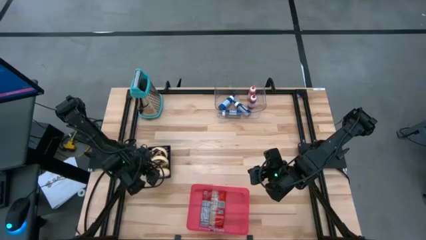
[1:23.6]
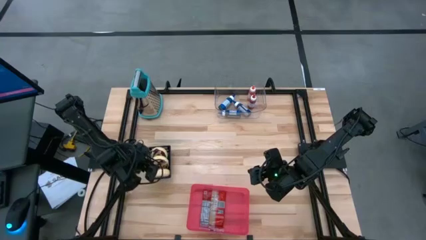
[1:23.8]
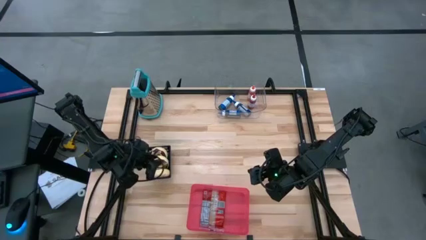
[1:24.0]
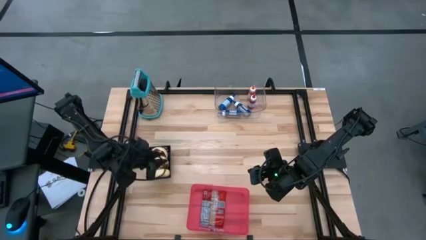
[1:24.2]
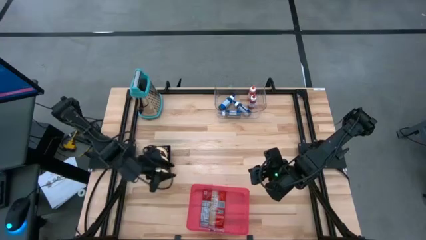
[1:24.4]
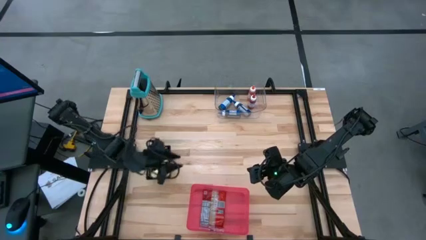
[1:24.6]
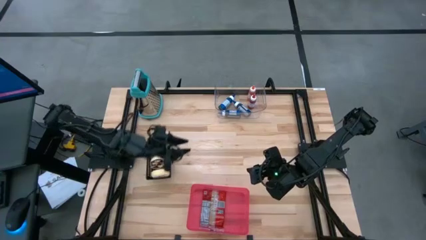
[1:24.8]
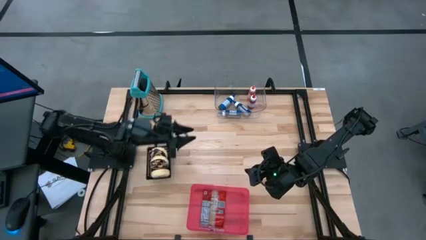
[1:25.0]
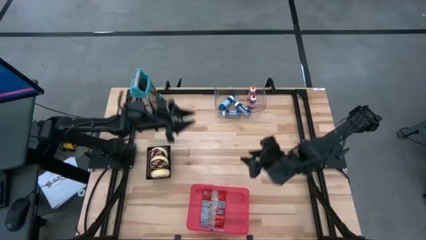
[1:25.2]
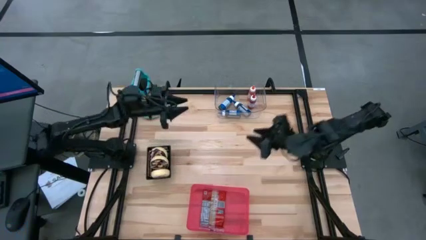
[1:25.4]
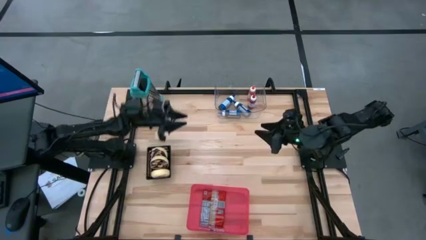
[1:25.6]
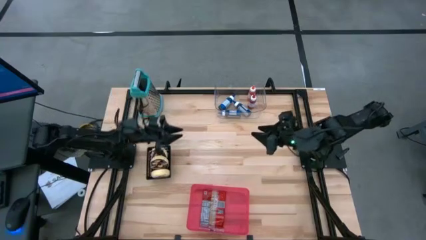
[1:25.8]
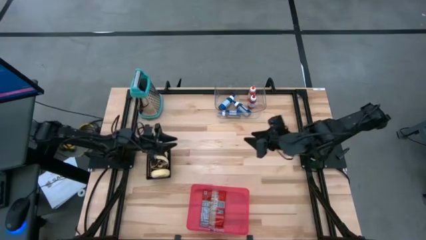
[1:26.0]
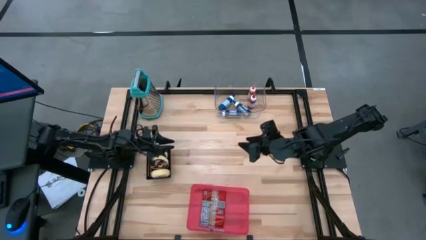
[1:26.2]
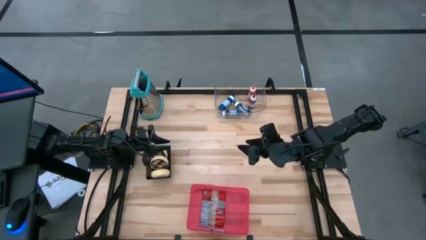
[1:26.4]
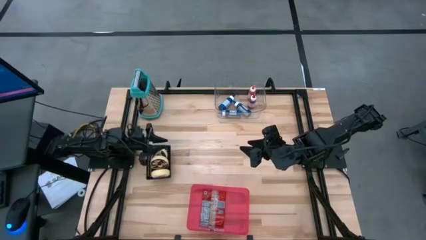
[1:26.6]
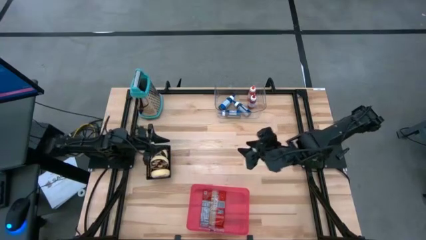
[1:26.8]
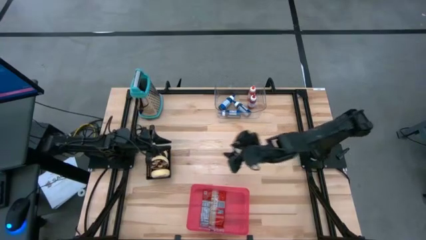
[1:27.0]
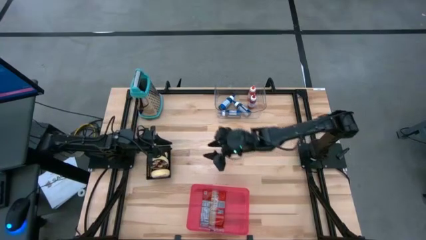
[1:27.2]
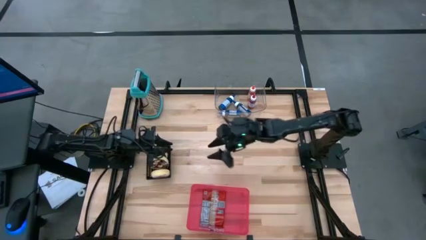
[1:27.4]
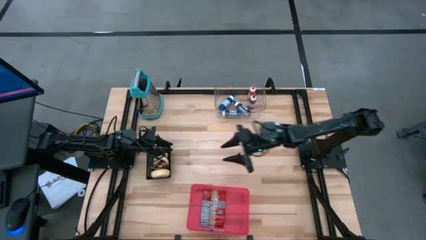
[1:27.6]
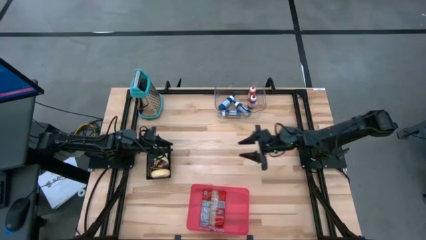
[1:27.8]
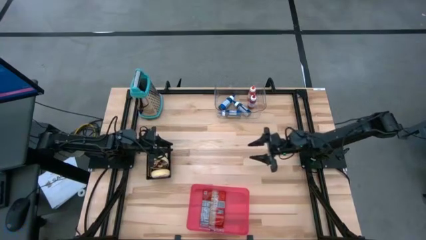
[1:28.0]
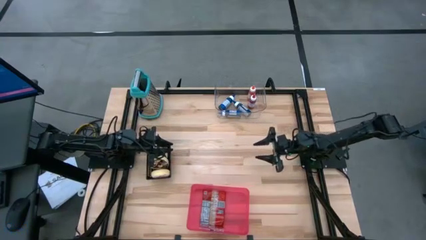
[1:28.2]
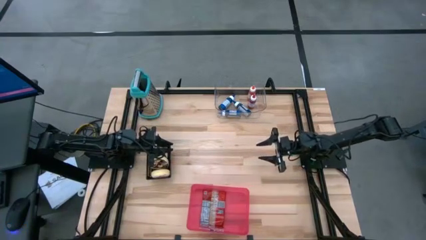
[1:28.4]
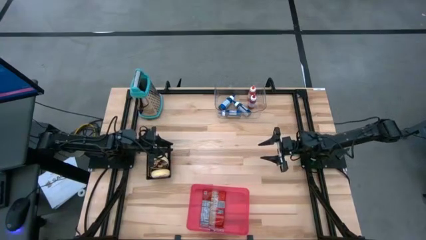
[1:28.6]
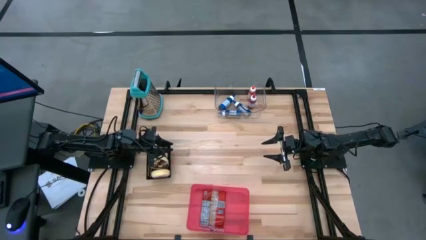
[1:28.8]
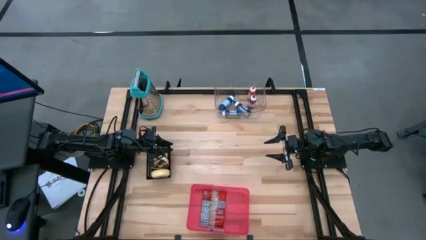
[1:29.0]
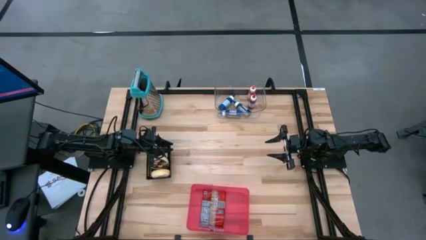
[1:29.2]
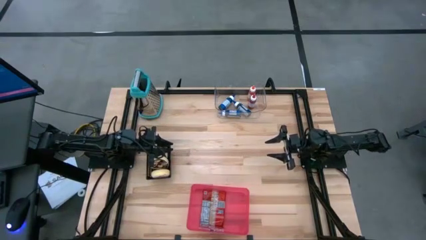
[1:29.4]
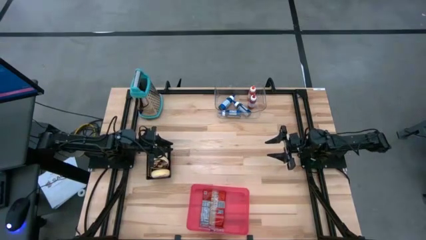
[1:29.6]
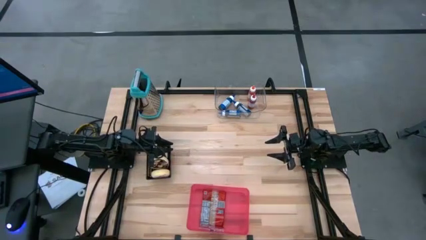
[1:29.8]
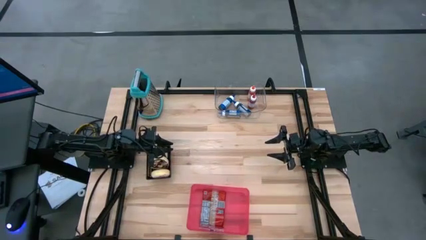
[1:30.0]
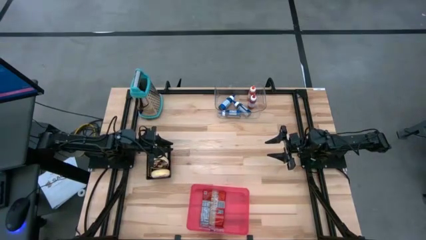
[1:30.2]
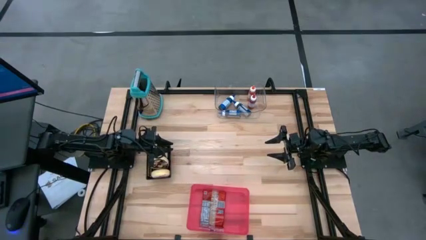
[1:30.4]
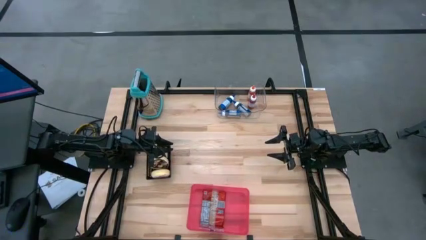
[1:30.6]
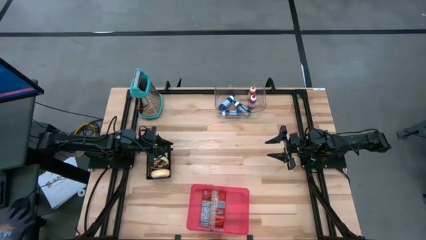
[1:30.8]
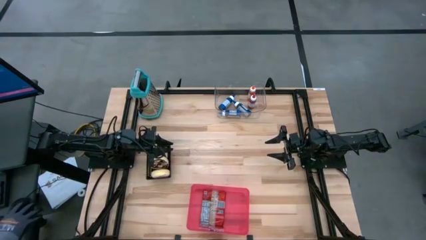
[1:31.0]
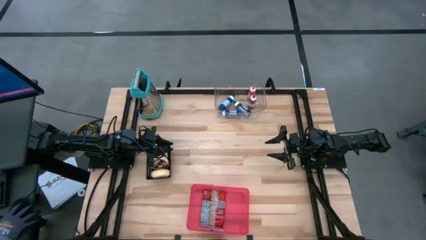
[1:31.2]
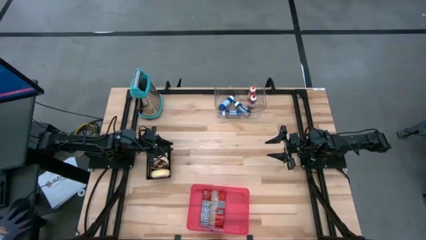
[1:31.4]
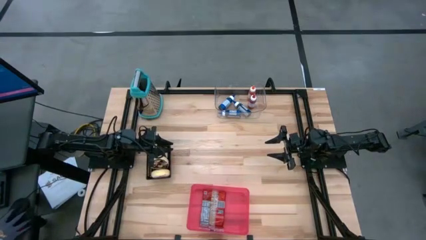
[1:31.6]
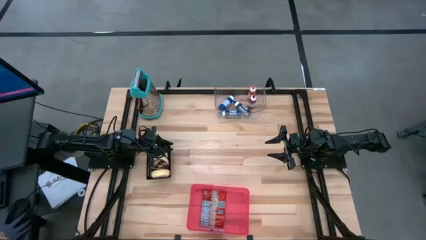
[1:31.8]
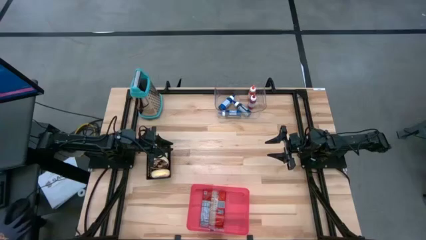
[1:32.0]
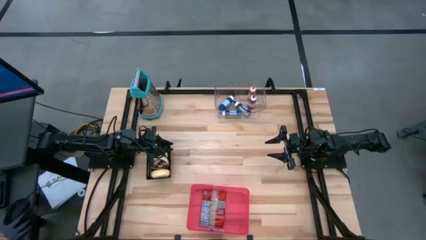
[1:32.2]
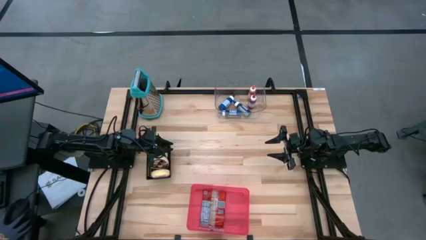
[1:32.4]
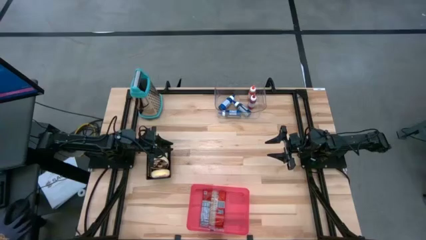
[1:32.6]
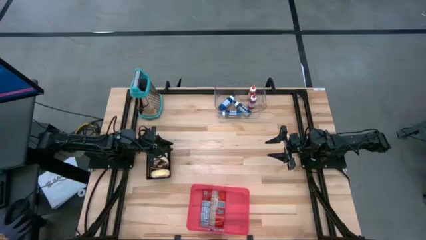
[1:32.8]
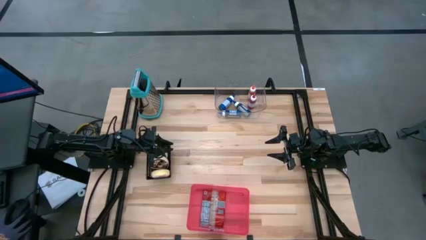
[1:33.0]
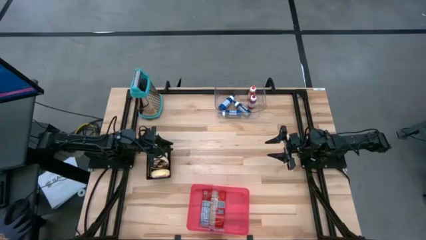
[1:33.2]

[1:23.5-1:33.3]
Return to Home Position

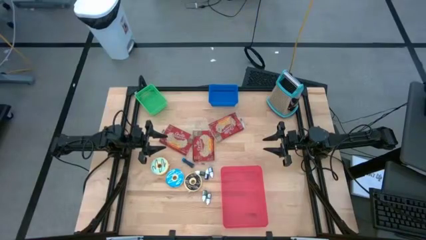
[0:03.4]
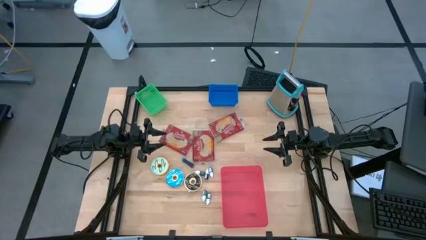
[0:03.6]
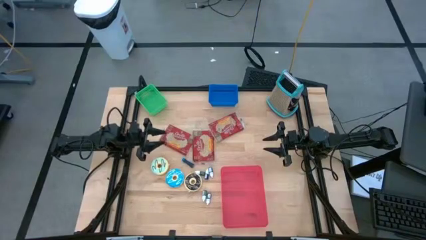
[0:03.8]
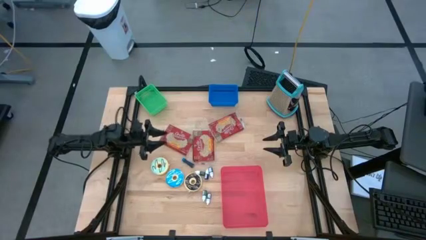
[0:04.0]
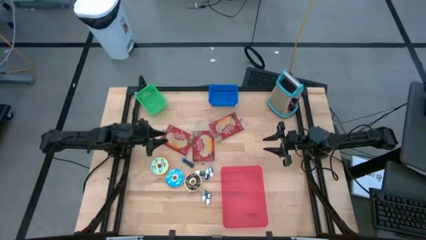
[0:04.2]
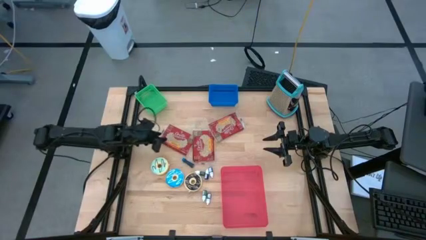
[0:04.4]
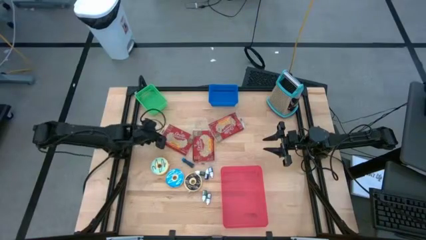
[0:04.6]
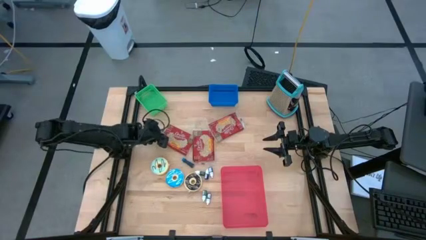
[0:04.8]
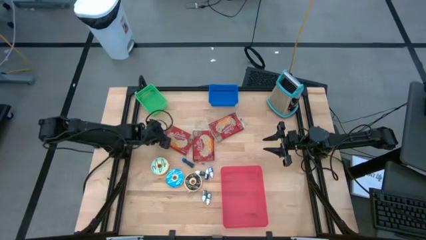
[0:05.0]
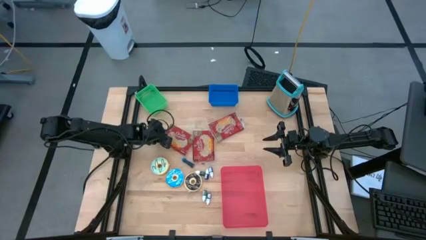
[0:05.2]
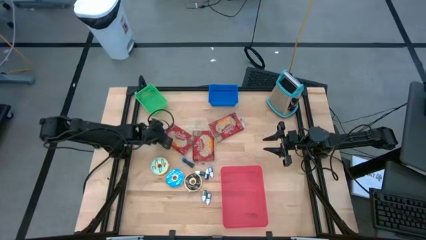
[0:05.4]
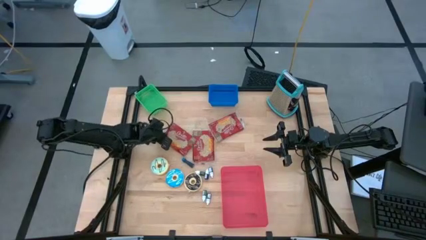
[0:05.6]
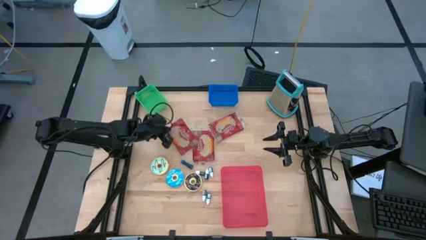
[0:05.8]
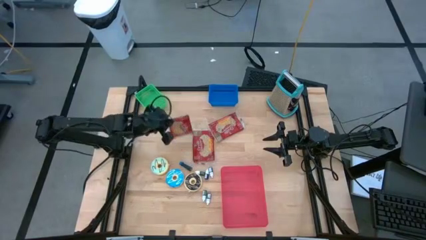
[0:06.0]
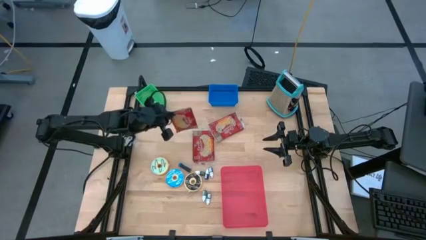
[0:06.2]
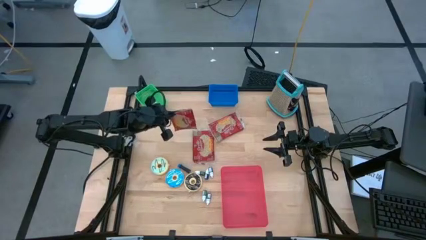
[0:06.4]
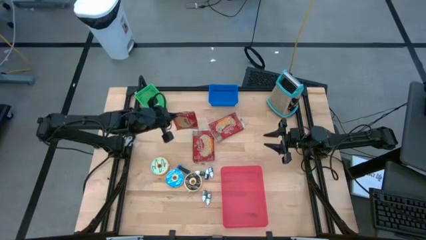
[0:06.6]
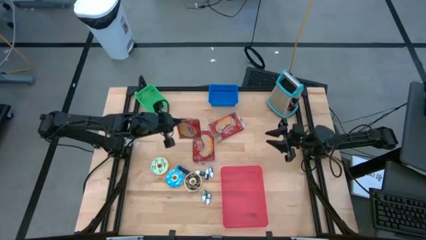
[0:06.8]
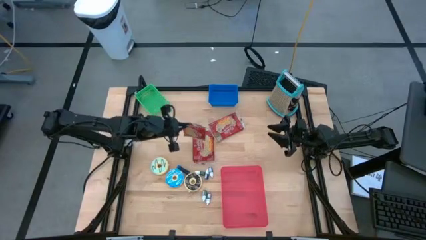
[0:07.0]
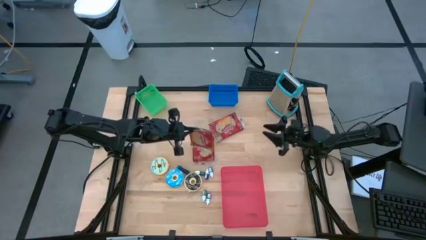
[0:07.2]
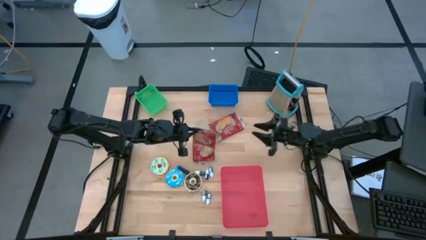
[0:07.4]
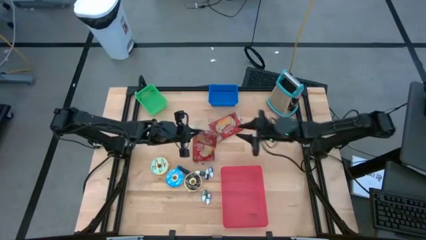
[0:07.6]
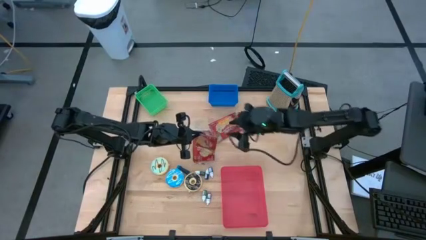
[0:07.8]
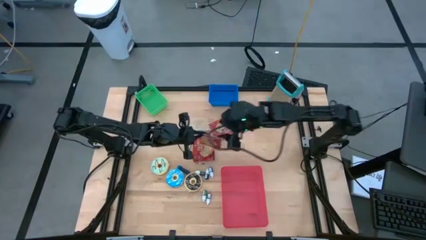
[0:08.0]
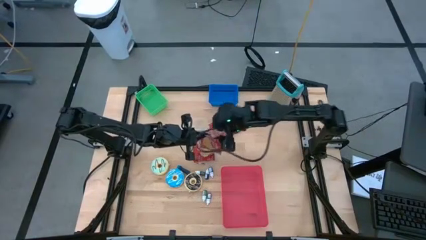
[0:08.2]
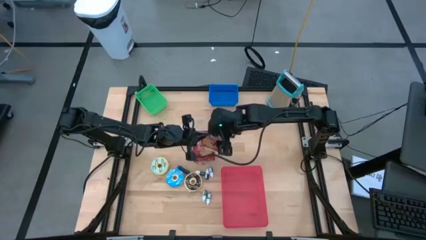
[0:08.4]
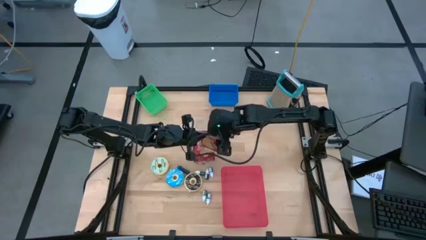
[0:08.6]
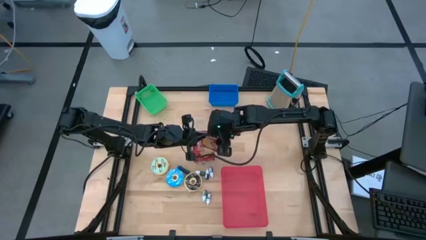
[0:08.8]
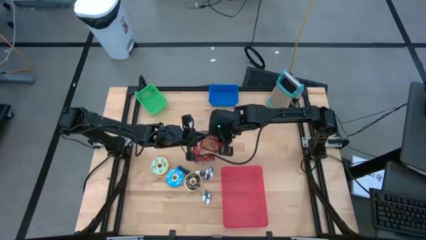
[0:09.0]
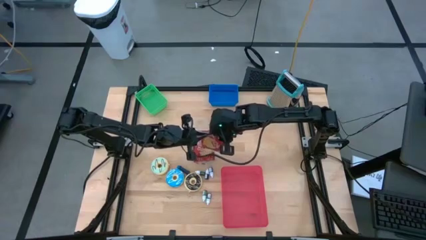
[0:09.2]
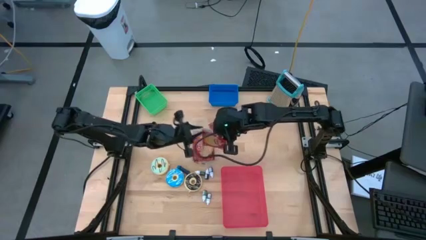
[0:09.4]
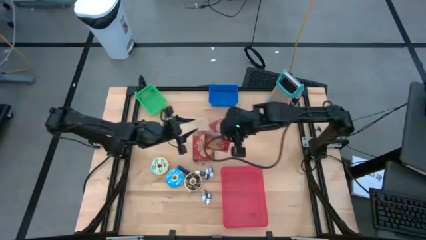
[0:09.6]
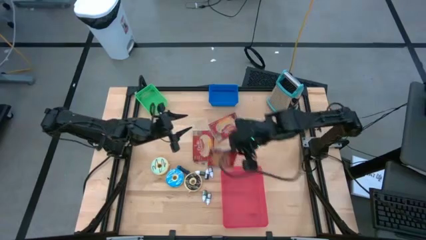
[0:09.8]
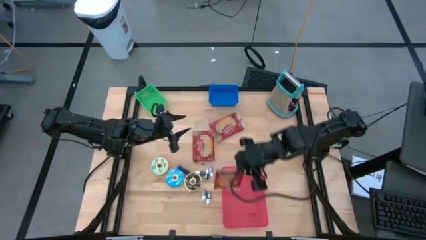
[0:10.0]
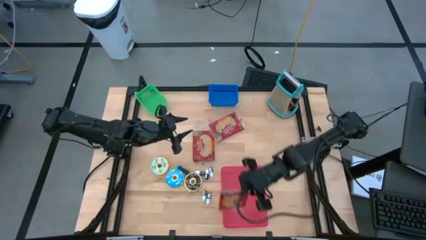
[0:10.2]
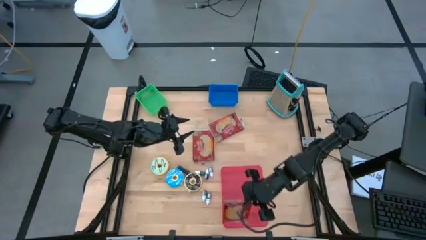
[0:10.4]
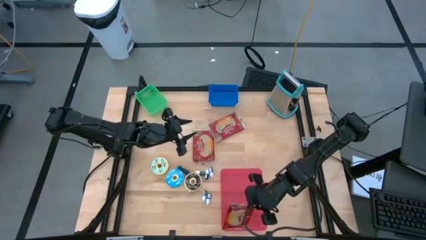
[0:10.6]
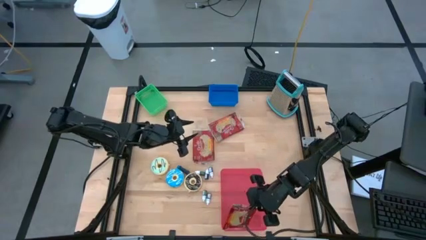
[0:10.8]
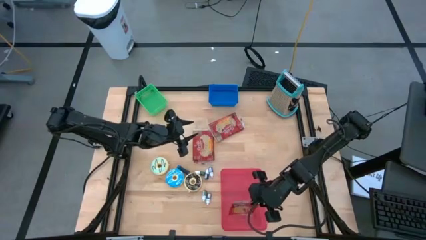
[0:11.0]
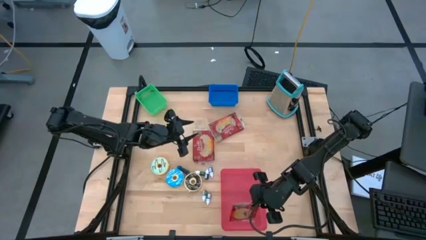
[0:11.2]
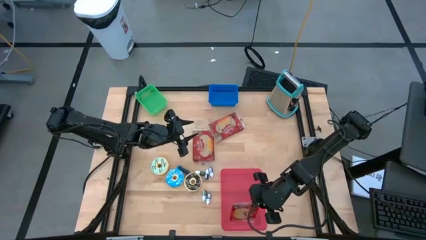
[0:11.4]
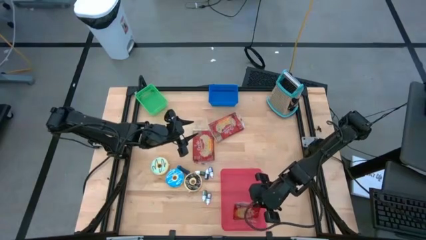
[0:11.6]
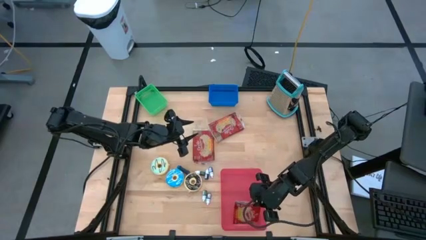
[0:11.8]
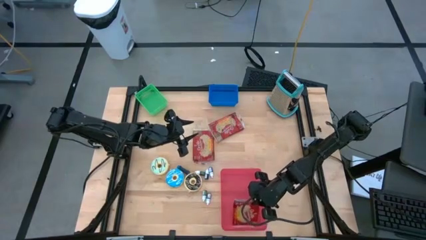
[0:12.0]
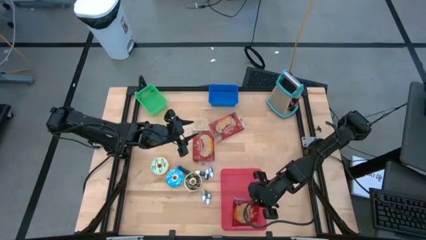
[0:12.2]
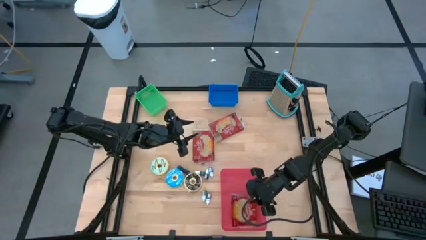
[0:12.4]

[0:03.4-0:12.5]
Put the left red popcorn bag into the red bin
